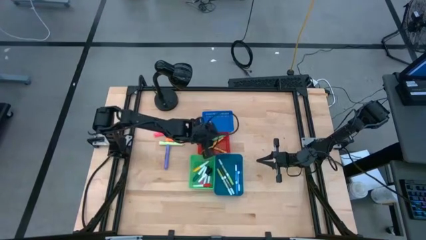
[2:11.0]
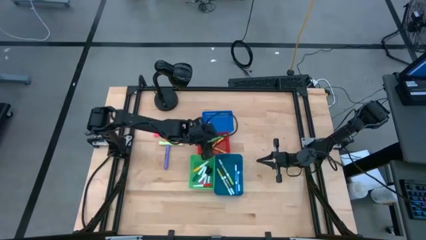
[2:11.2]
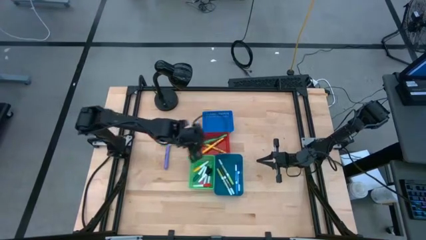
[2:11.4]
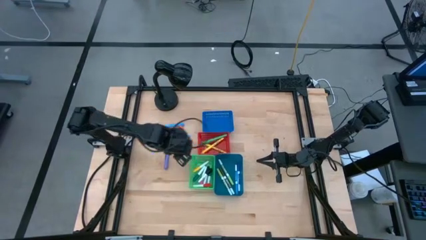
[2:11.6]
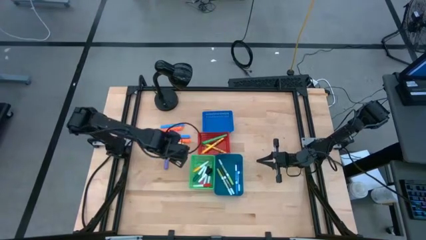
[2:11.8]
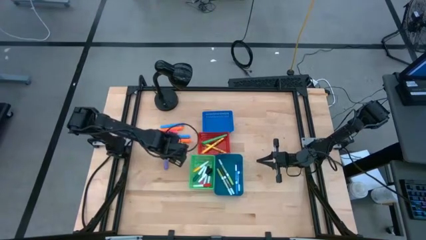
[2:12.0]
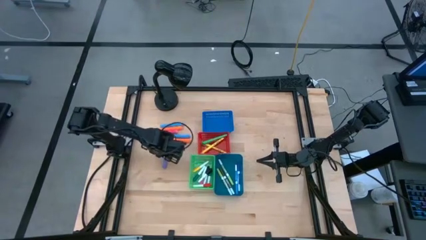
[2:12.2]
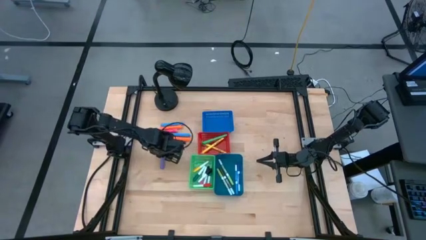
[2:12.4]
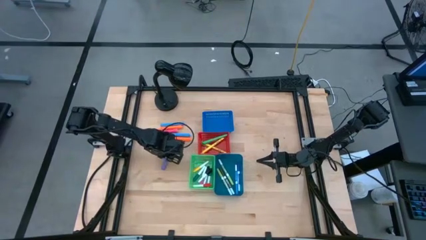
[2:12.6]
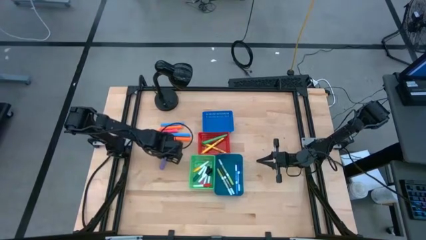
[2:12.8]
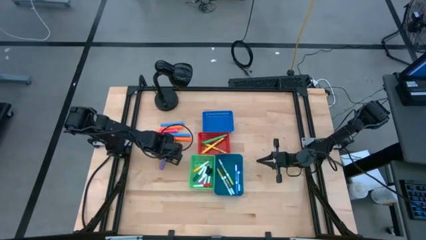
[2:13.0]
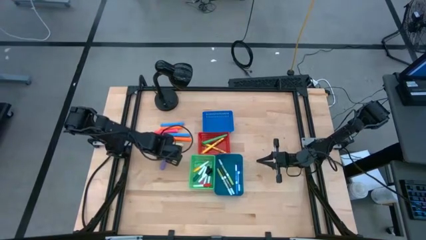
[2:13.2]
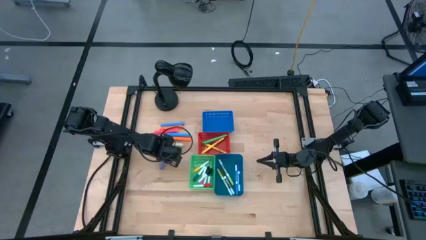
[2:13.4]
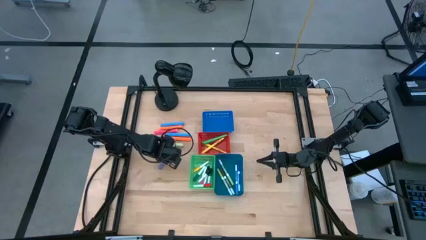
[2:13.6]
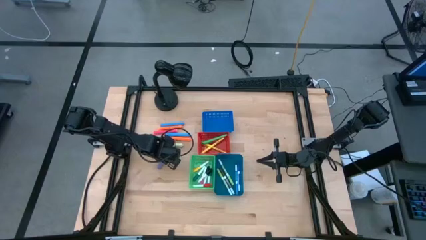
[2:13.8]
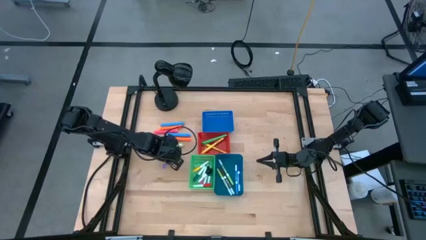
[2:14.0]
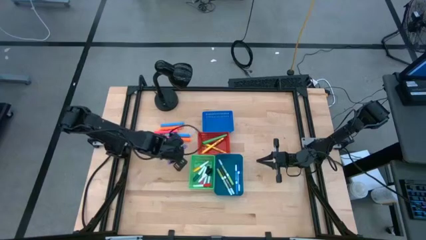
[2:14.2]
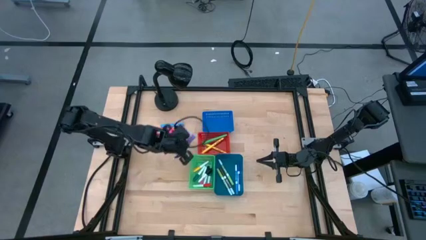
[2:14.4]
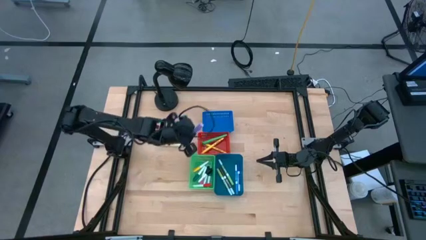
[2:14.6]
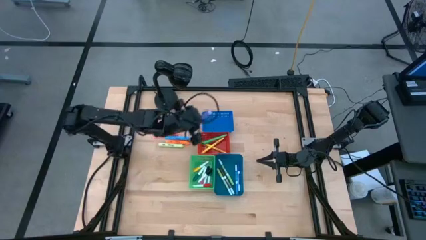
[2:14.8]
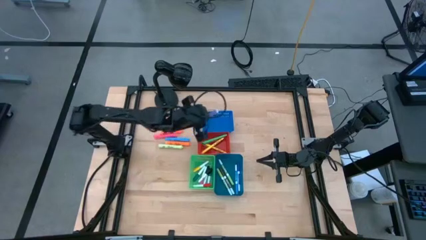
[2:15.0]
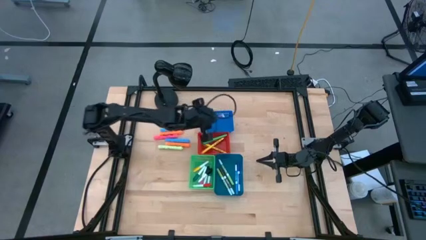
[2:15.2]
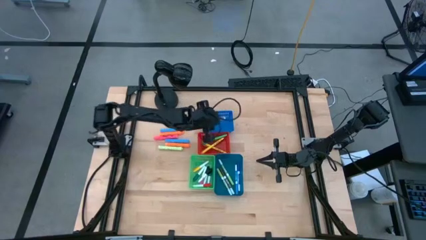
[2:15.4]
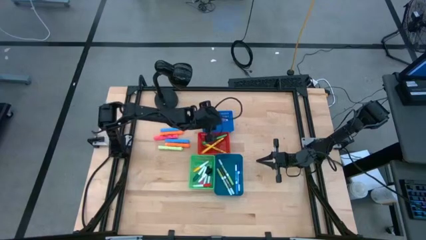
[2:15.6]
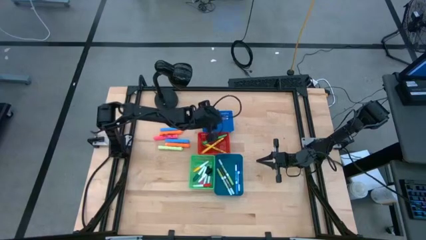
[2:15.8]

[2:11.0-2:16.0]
Task: Pick & Place Markers
Put the large purple highlighter pen into the blue bin

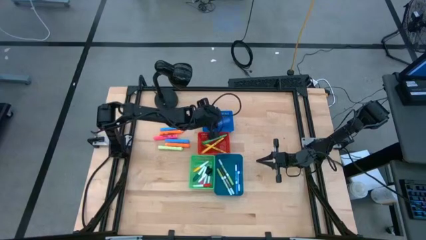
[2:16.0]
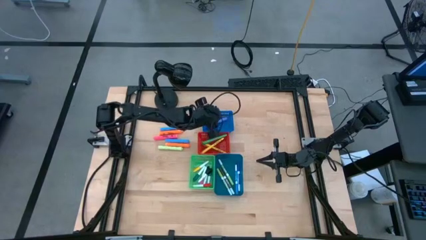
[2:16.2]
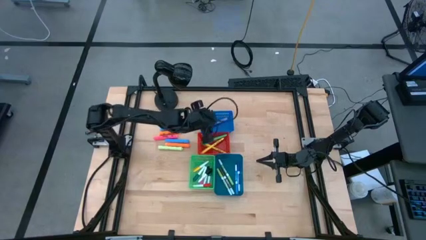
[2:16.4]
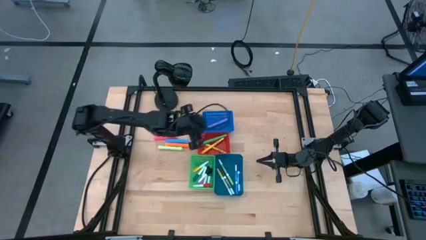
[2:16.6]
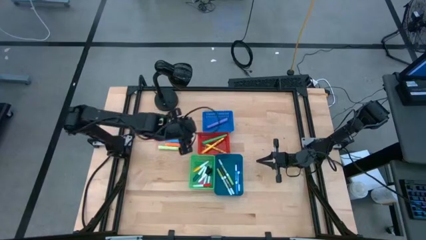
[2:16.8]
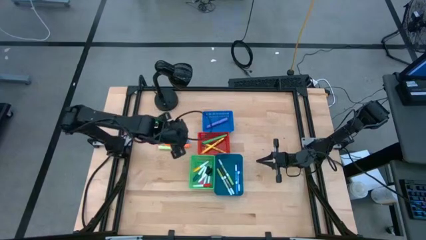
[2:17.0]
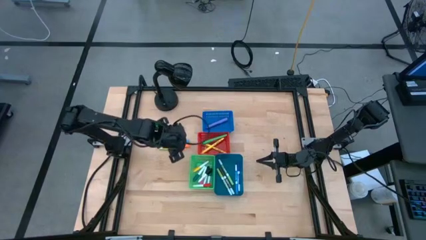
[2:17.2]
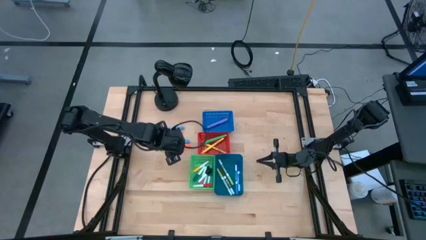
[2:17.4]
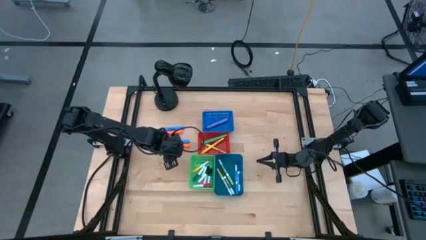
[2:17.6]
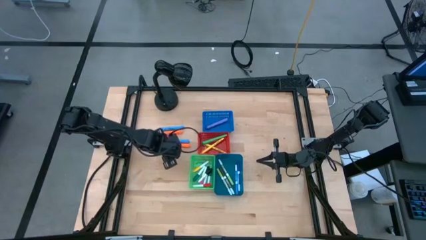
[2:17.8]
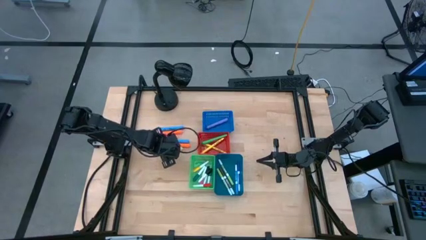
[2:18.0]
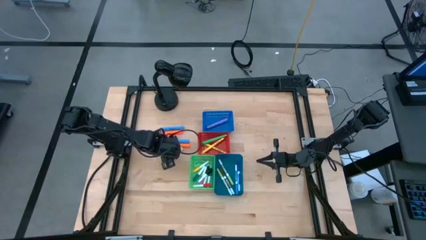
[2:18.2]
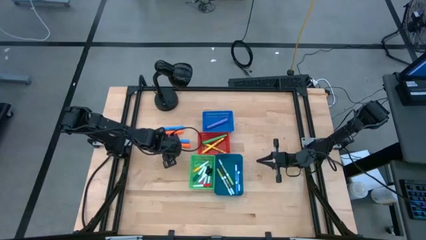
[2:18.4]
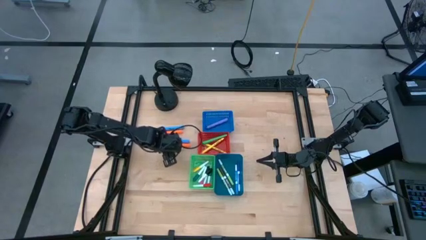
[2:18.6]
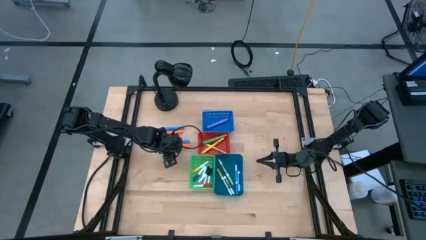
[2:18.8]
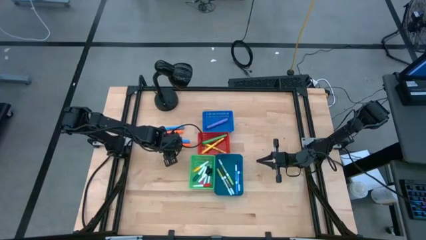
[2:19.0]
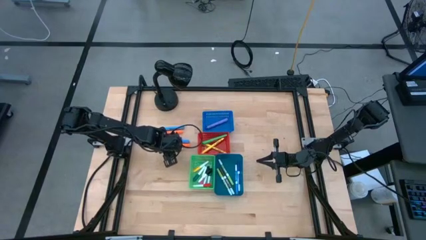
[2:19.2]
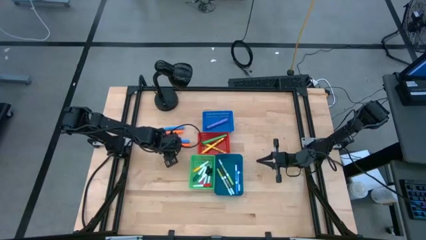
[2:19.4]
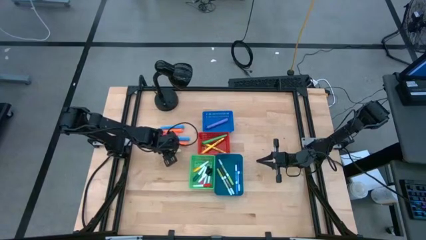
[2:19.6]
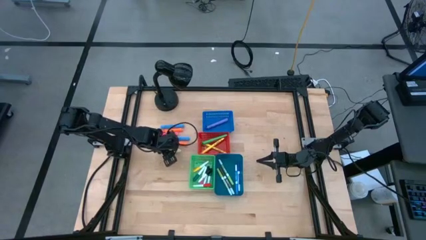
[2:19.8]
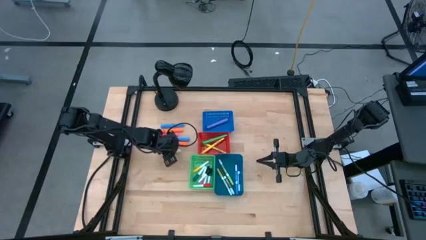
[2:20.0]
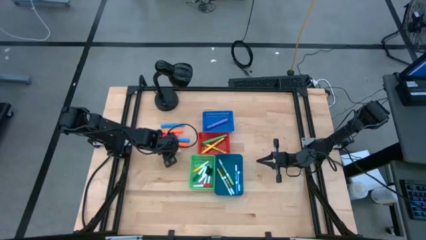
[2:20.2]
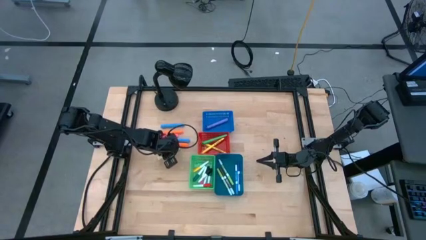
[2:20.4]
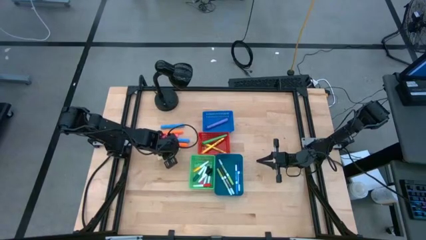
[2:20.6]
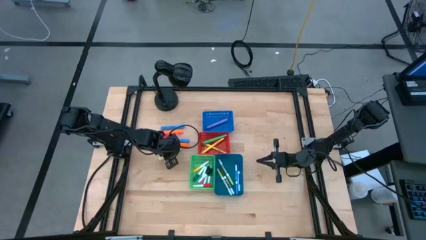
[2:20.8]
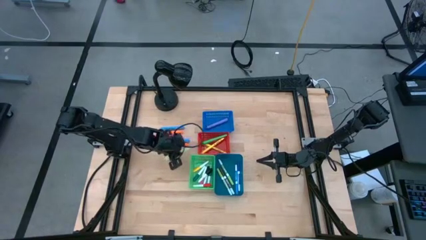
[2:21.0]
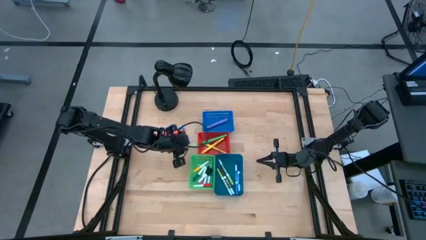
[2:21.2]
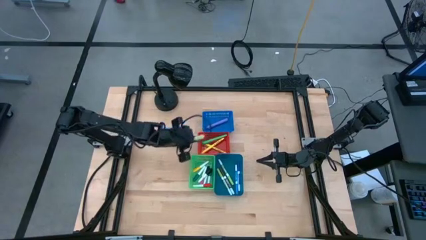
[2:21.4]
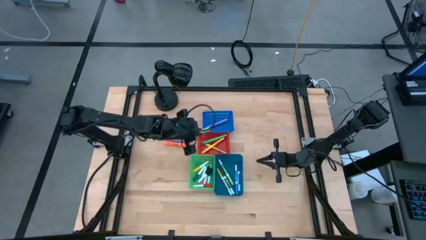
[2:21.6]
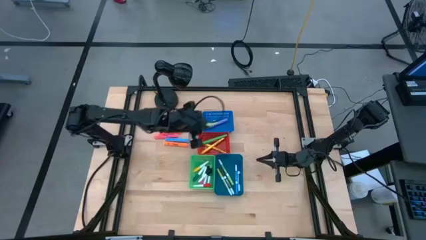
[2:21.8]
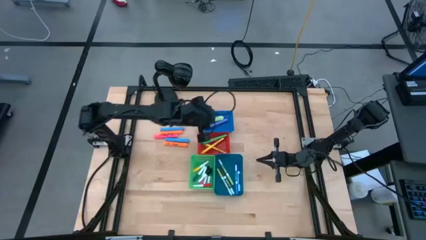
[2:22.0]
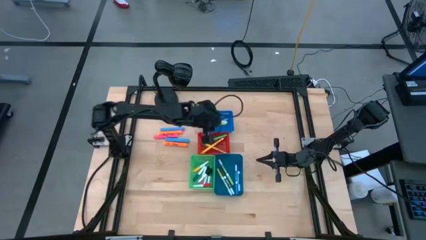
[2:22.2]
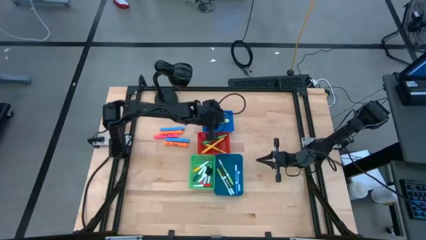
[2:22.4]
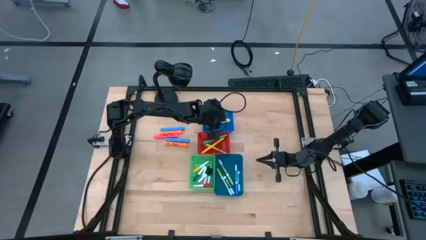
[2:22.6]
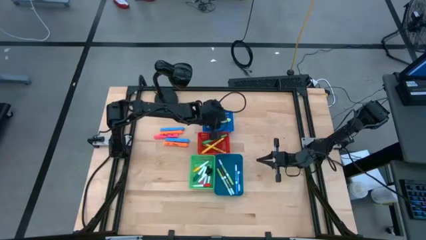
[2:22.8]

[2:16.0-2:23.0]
Put the large green highlighter pen into the blue bin

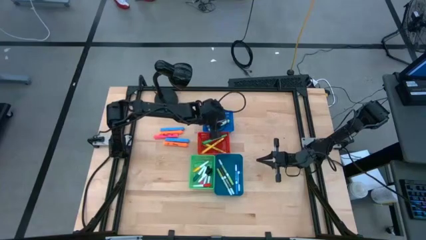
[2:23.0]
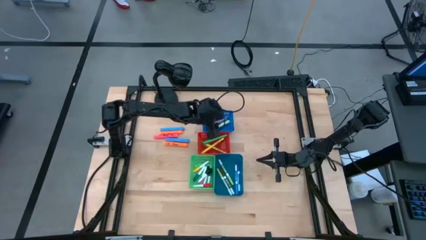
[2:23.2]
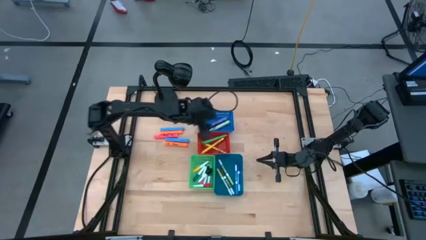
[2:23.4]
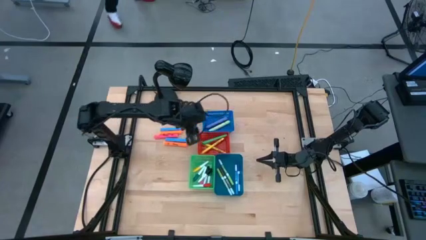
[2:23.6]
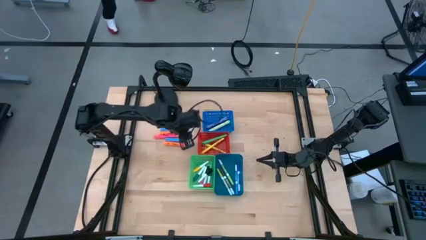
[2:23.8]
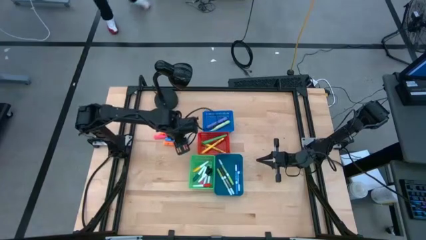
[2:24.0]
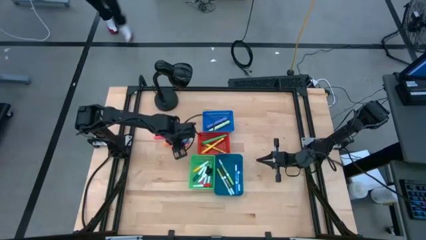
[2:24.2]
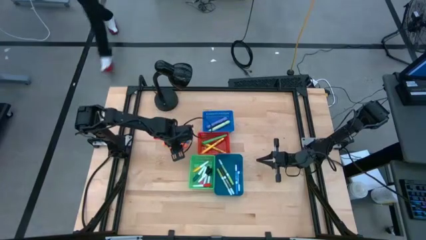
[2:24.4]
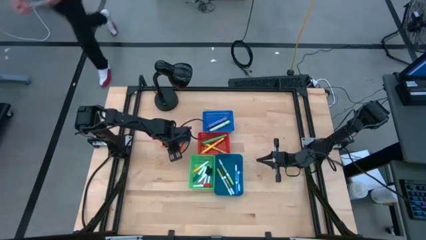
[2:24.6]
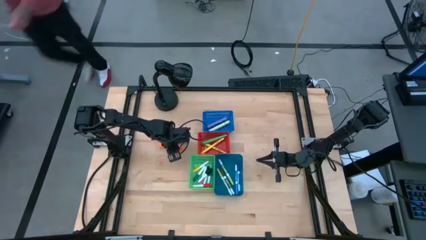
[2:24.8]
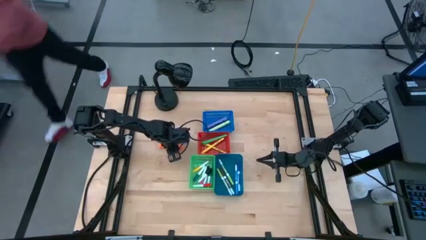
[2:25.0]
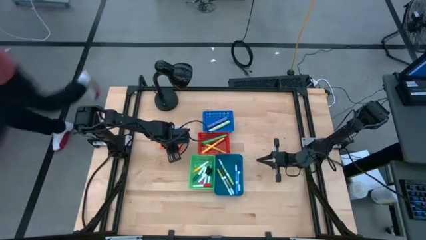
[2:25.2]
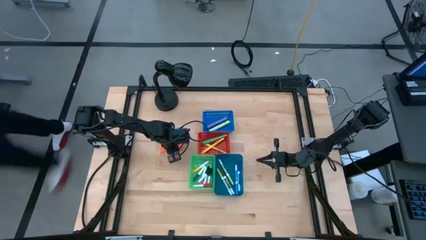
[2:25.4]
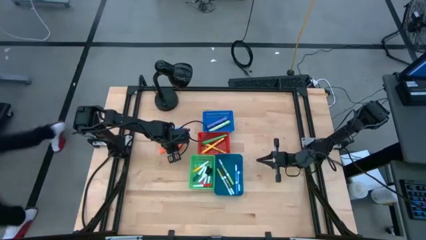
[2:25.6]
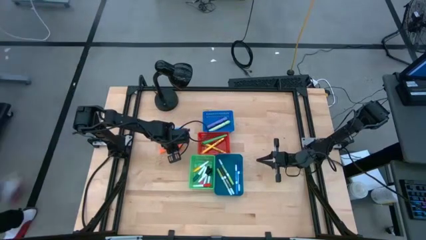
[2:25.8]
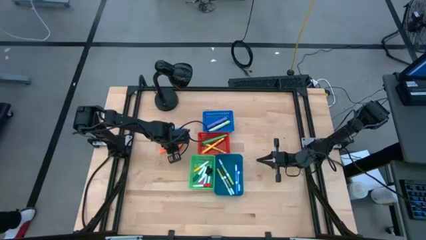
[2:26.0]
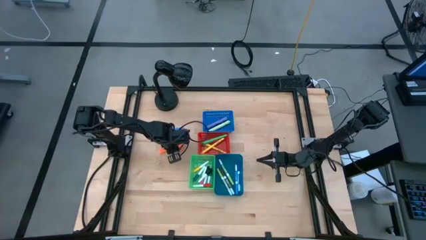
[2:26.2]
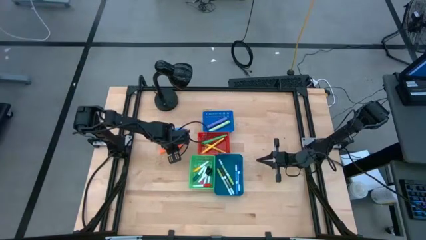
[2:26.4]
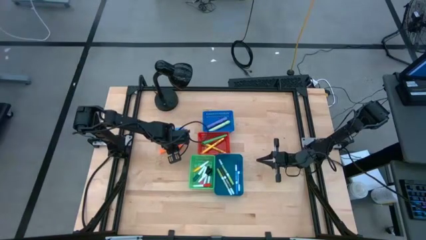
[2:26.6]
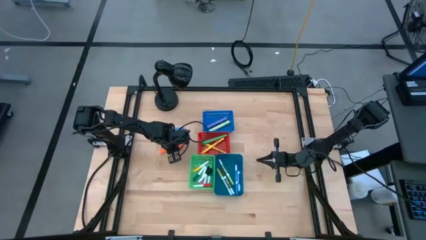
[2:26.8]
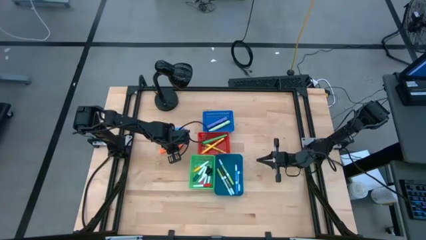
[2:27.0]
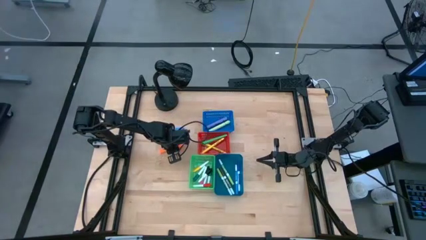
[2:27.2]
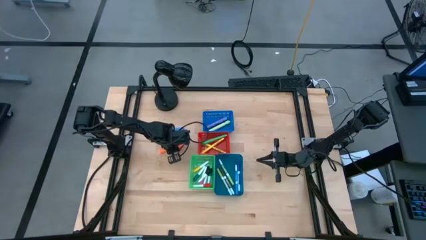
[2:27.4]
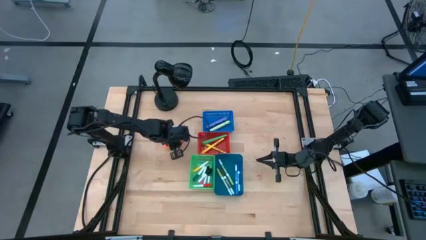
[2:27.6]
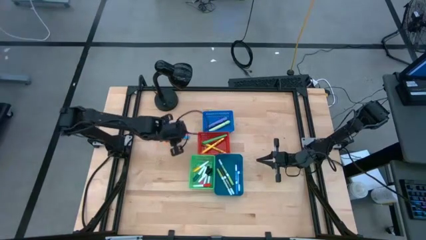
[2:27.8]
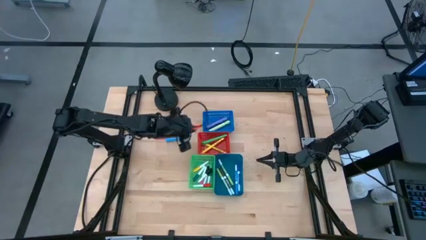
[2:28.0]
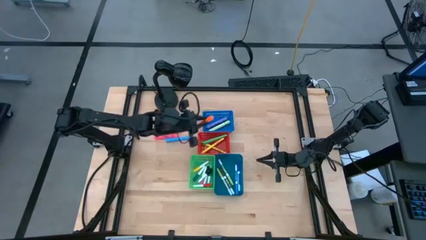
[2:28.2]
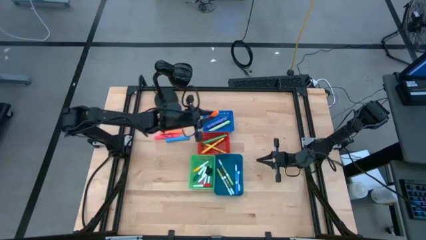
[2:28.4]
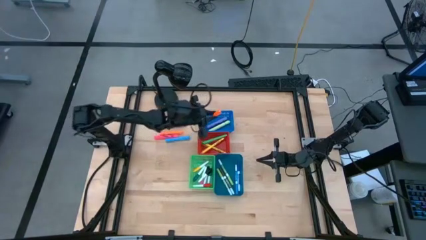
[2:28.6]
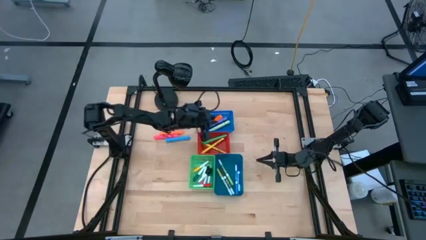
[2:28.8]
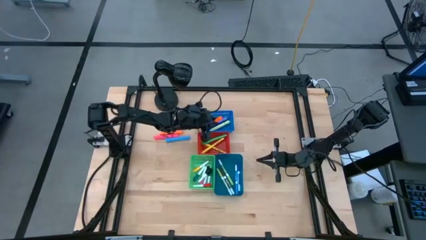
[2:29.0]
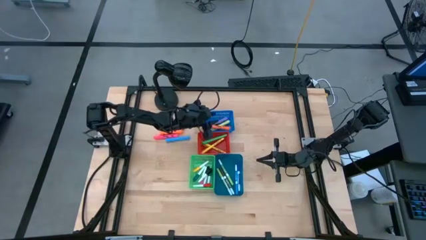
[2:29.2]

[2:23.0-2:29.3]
Put the bottom large orange highlighter pen into the blue bin
